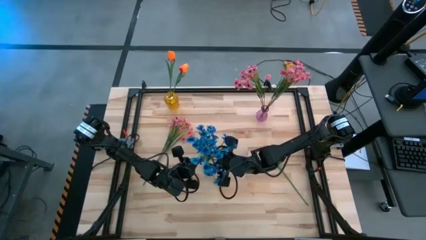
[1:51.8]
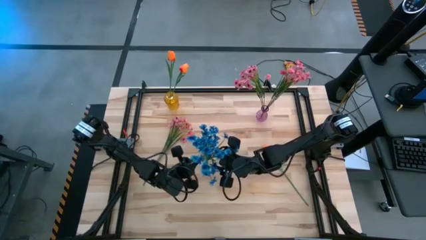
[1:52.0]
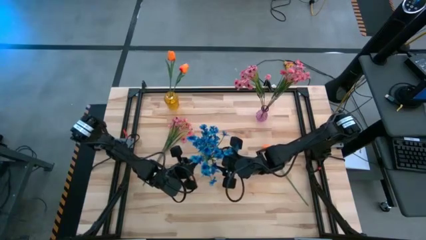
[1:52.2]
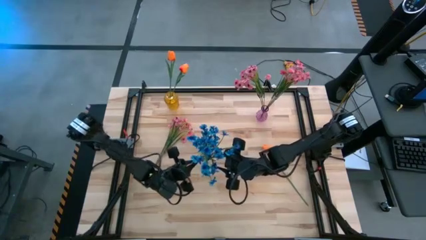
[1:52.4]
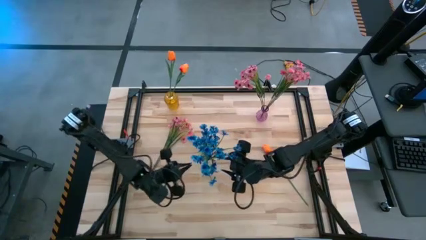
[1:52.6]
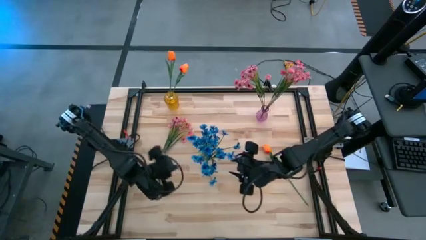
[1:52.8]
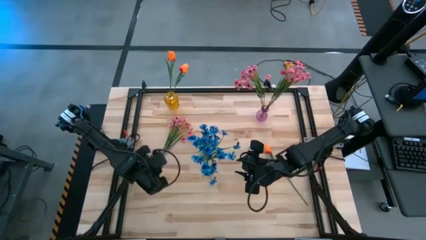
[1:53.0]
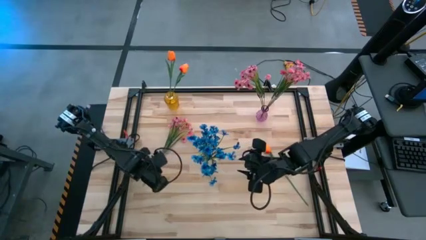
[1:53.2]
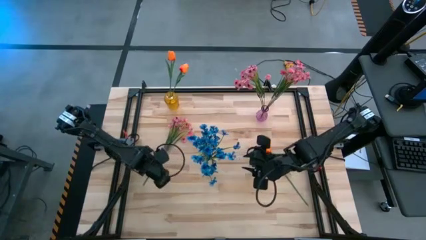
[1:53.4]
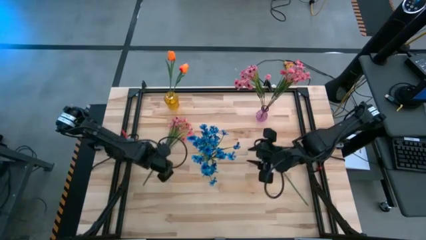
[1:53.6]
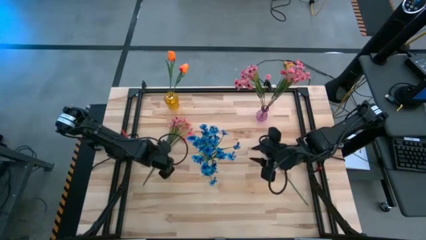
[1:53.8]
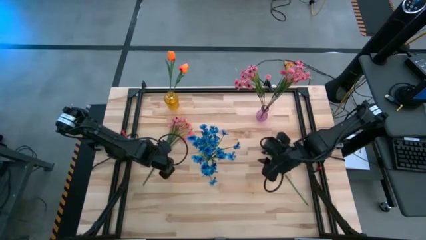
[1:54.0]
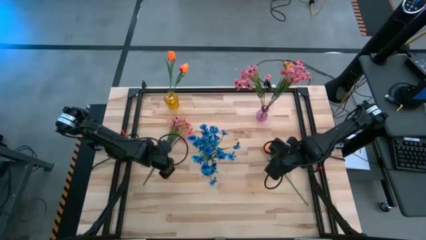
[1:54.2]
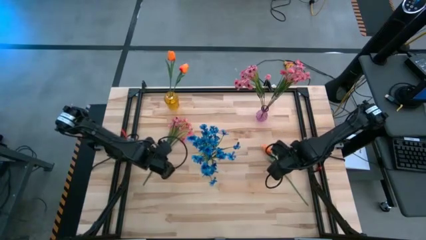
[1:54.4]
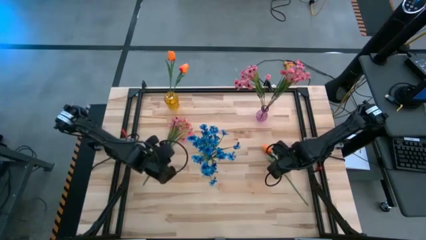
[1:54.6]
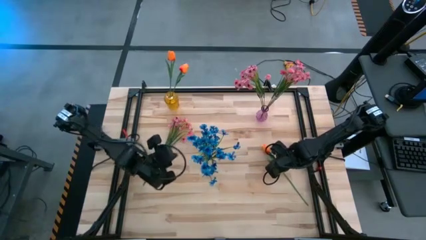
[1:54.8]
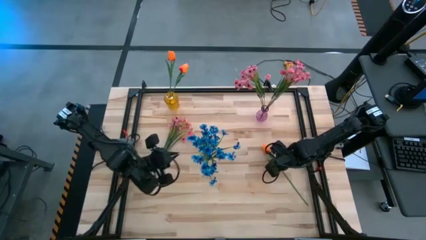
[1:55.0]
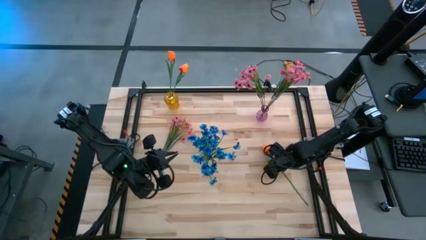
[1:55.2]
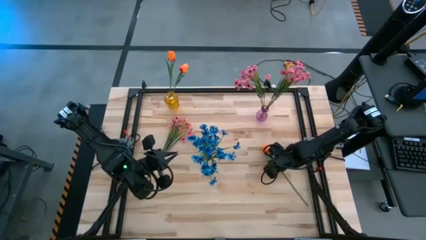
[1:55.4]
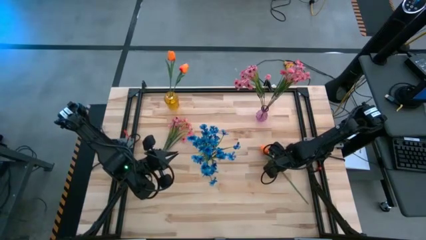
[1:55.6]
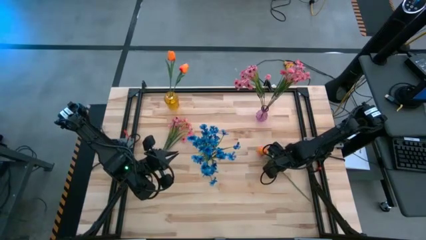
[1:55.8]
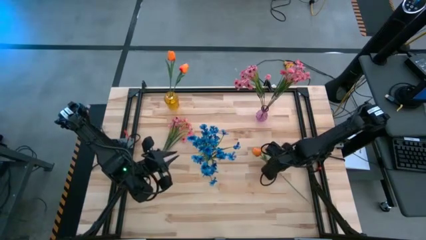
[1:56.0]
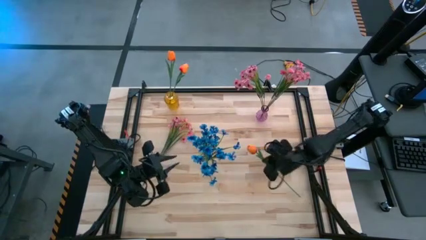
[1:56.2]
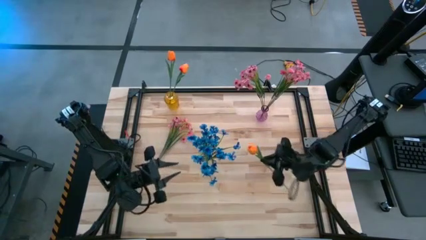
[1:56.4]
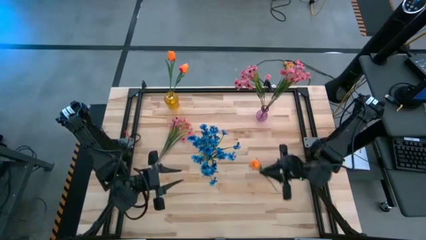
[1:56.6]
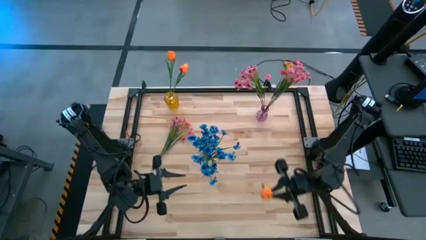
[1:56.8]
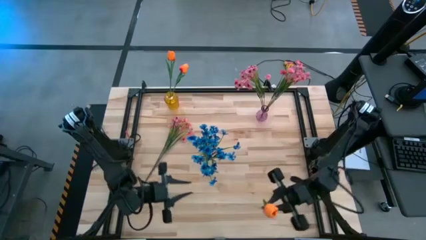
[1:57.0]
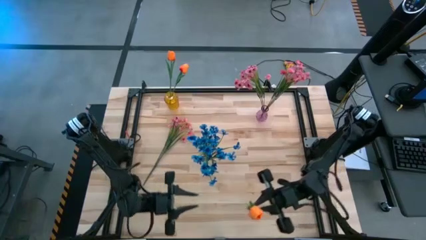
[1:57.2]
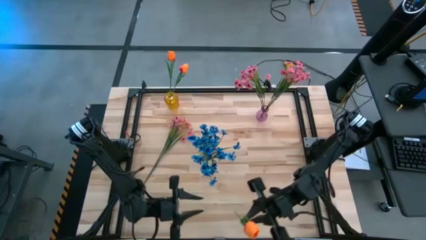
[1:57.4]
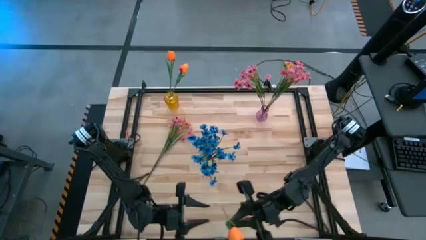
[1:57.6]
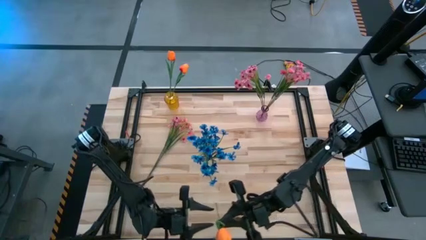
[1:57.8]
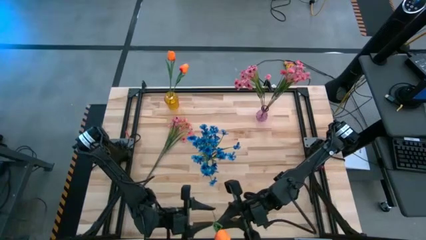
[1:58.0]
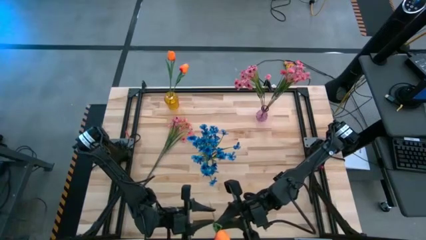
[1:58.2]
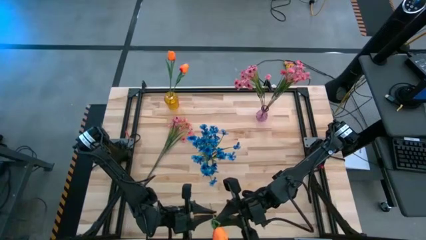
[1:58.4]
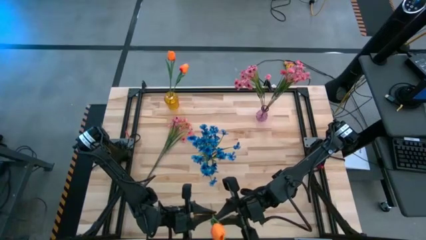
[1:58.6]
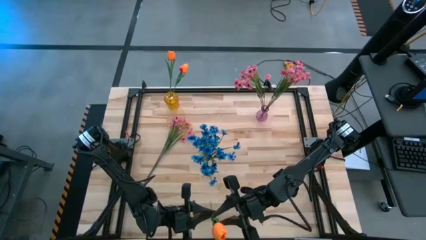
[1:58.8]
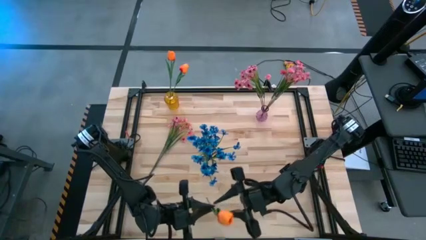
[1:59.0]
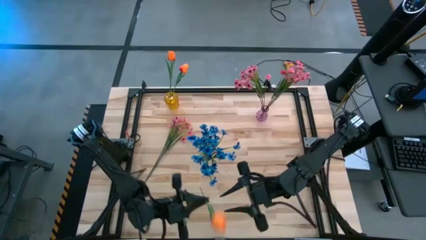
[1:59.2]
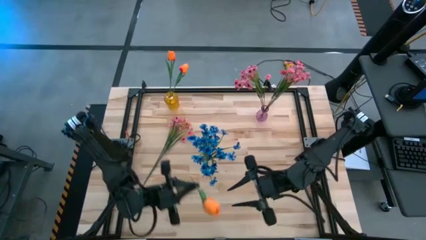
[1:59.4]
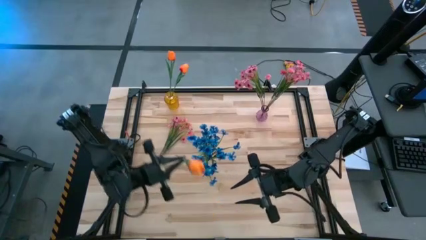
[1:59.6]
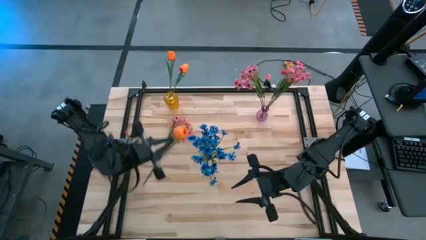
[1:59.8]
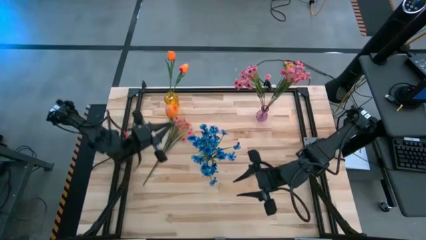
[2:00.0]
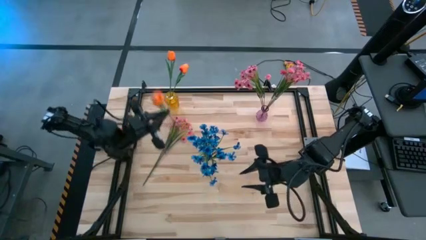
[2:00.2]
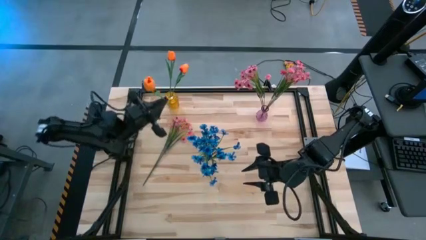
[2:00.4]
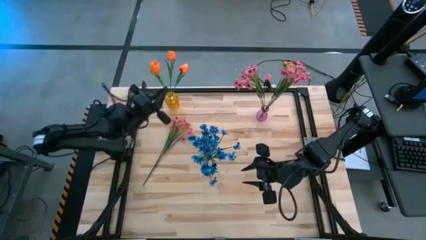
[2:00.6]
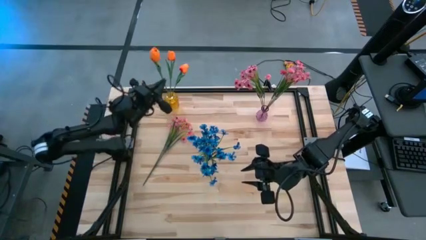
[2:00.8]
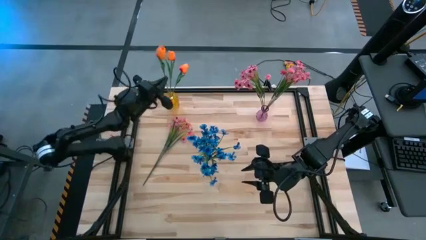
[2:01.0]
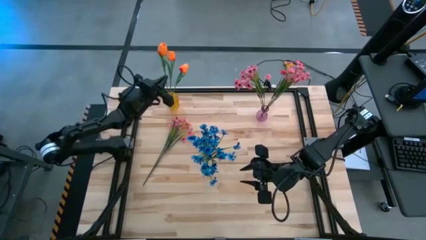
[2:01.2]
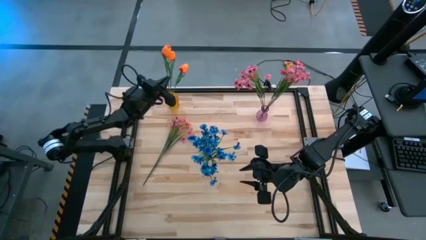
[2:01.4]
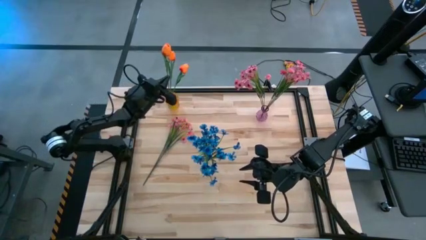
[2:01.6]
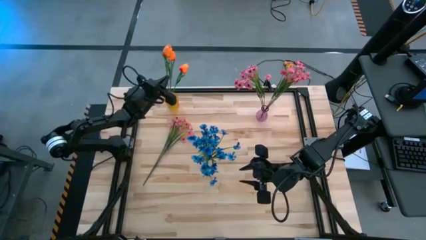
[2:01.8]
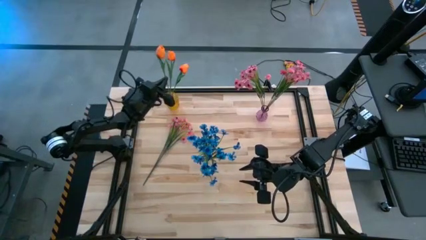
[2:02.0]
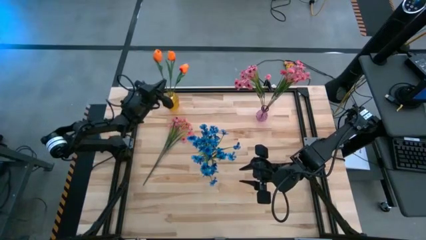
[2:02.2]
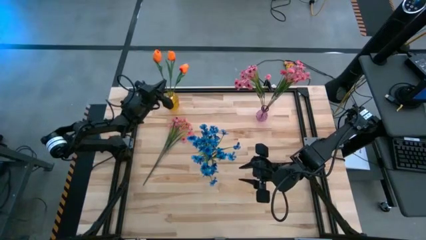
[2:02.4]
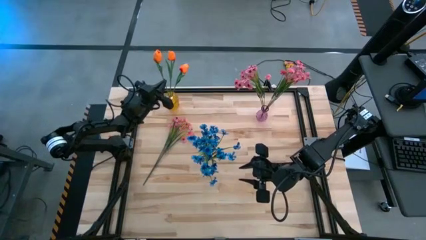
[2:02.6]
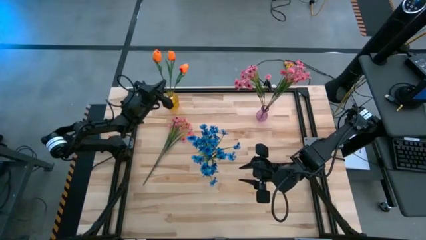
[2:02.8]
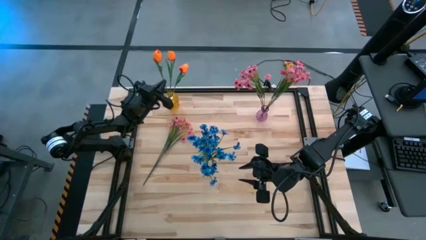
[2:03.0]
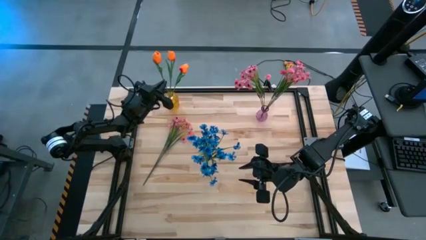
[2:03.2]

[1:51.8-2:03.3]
Task: Sort flowers into vase by color
Put the orange tulip into the yellow vase

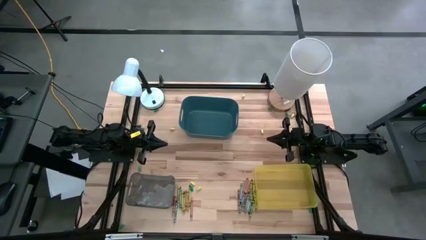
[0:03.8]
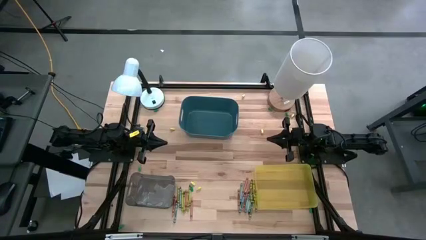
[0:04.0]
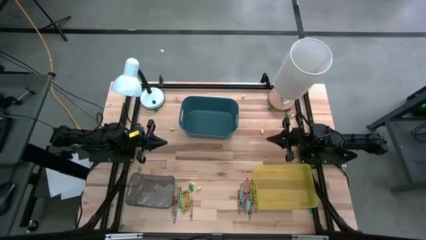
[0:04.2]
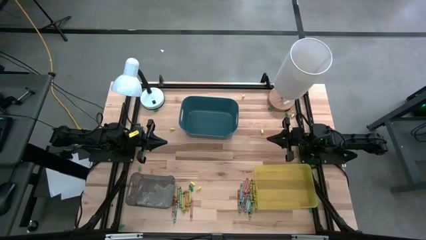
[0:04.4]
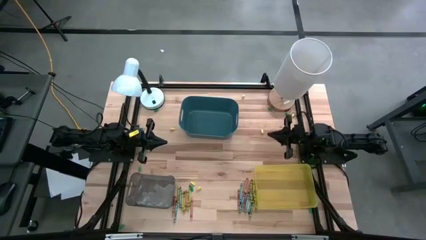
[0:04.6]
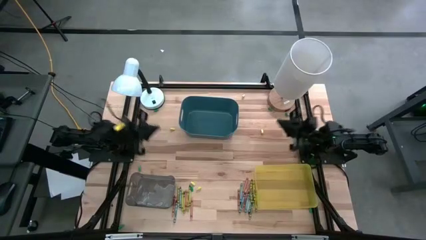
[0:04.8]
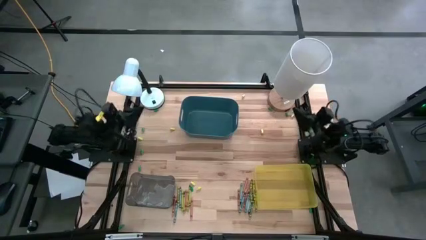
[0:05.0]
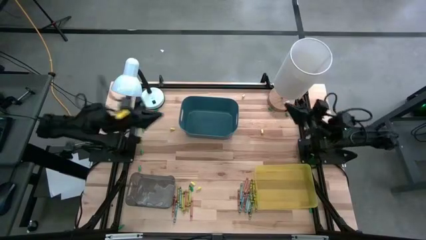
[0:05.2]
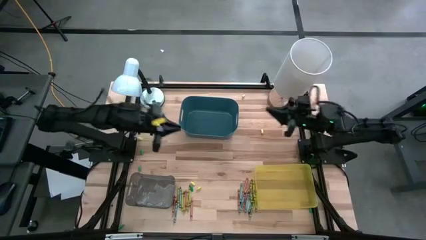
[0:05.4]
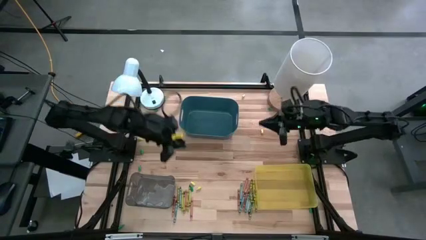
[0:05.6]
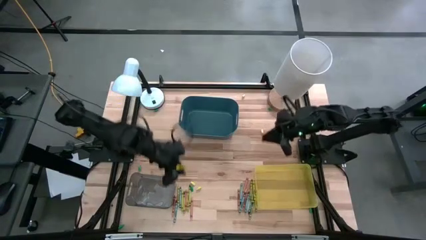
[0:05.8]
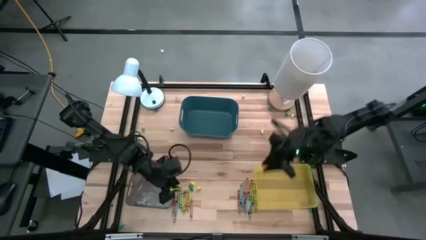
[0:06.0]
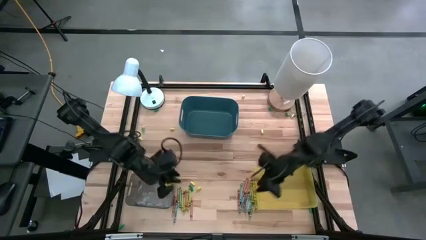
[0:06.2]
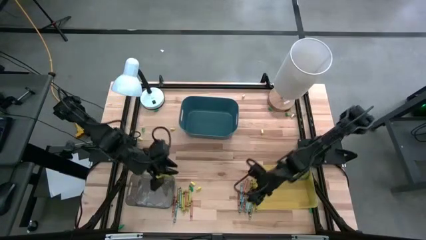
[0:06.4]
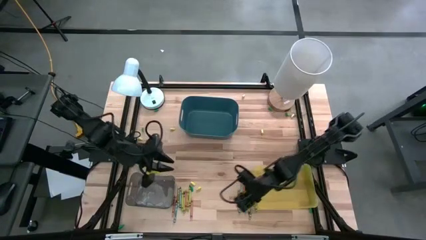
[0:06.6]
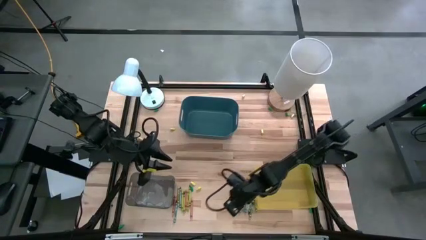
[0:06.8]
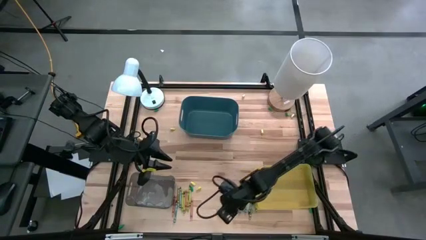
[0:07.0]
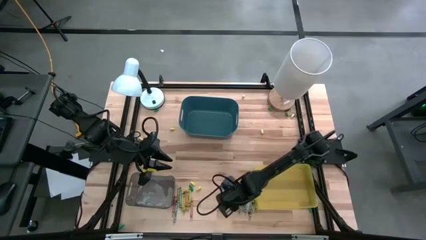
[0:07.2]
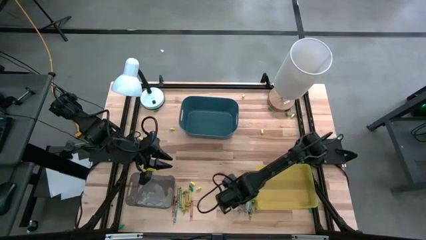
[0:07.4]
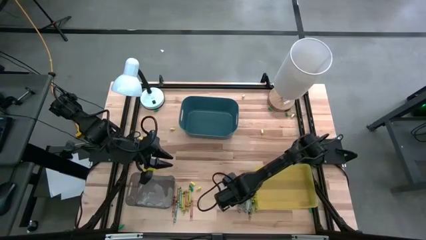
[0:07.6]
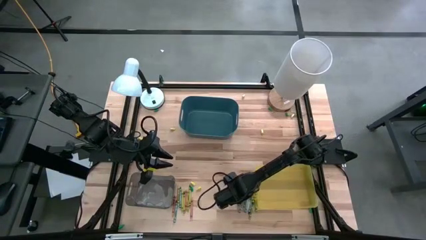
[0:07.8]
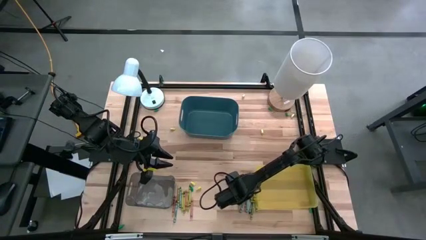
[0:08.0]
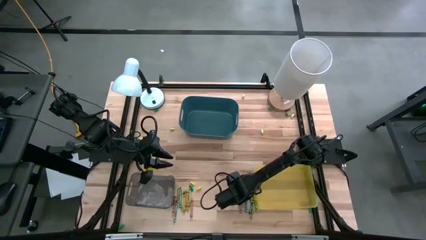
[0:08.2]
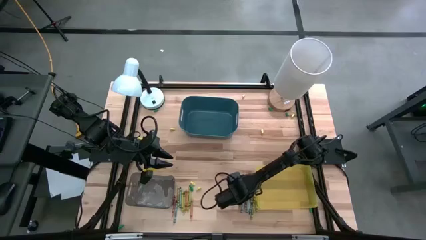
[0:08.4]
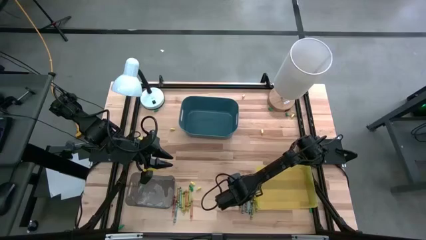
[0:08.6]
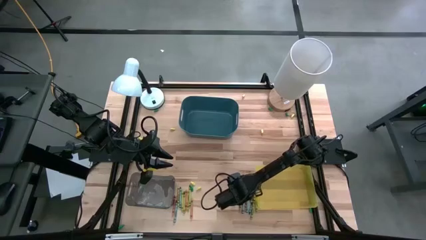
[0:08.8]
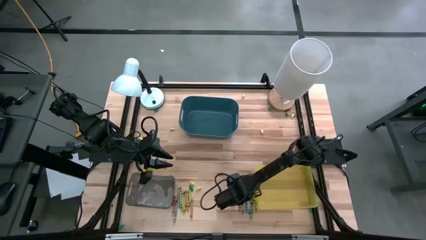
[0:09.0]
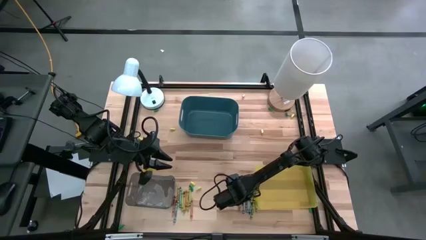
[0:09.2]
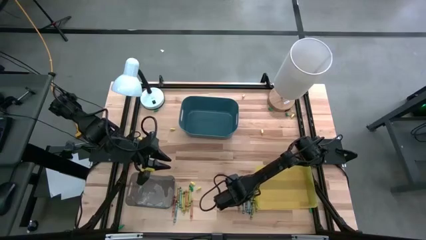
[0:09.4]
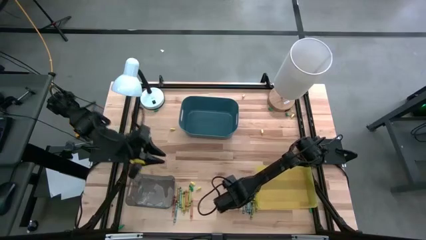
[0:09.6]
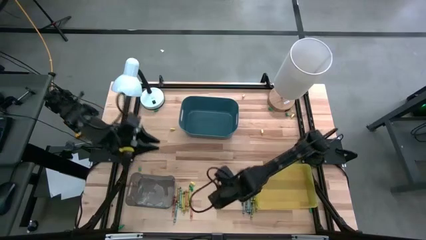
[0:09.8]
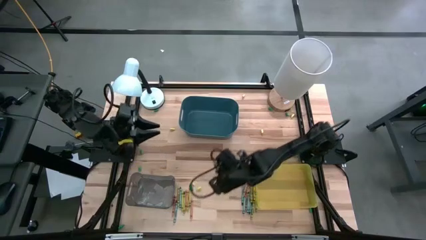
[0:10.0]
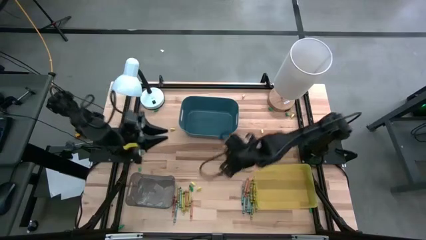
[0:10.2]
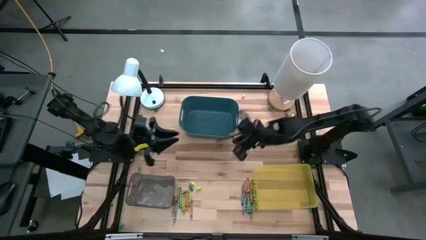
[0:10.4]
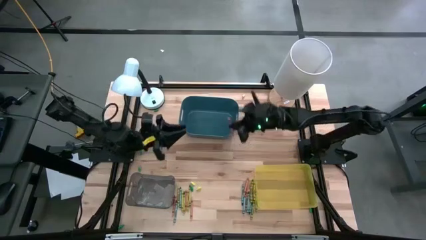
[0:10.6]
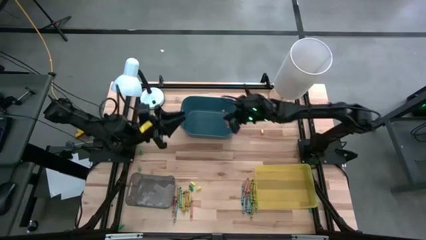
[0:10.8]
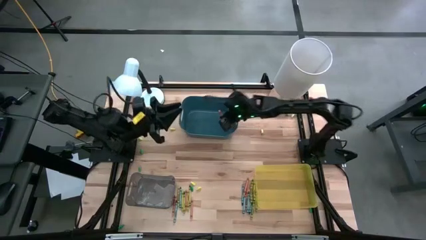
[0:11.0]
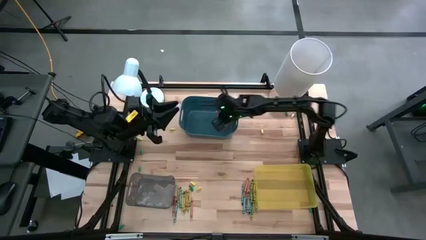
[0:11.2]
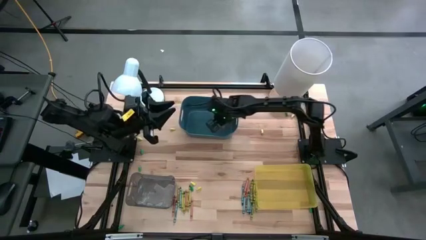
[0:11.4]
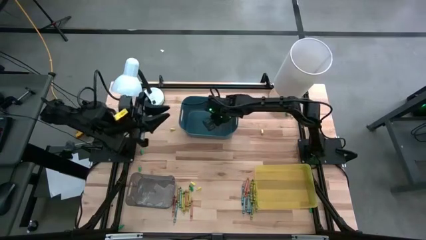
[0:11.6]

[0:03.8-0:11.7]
Task: Sort crayons
Put the orange crayon into the blue bin
